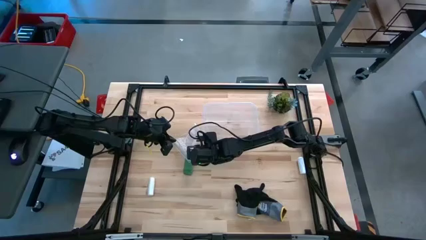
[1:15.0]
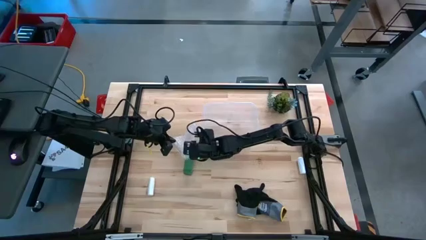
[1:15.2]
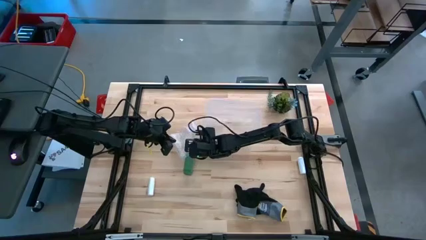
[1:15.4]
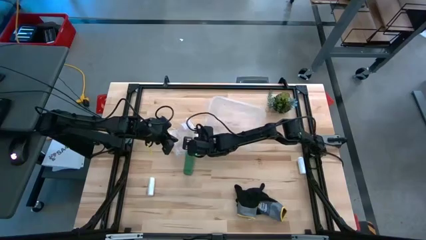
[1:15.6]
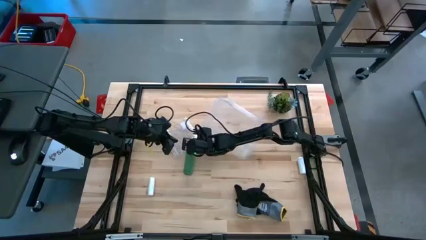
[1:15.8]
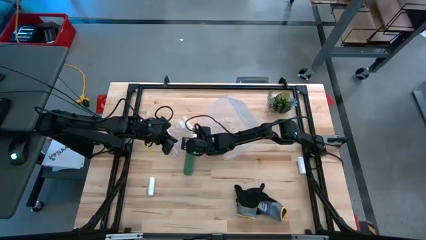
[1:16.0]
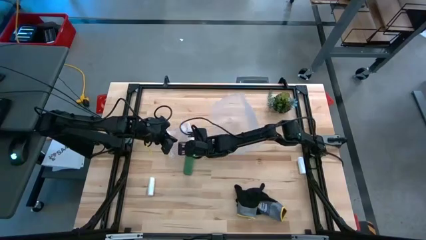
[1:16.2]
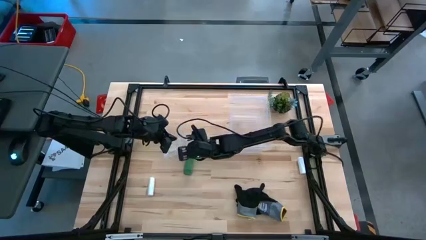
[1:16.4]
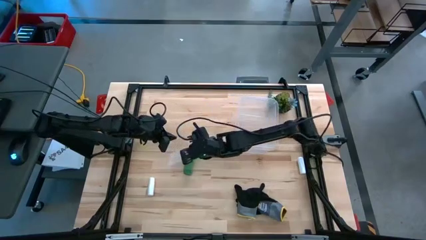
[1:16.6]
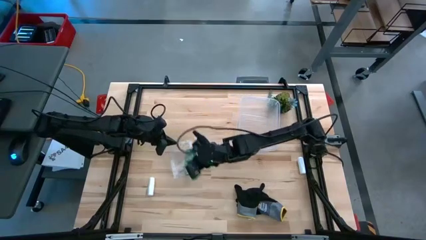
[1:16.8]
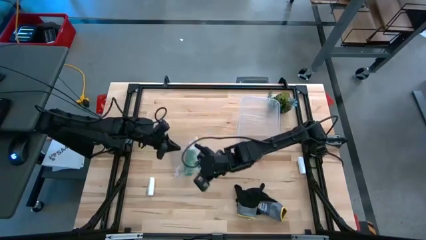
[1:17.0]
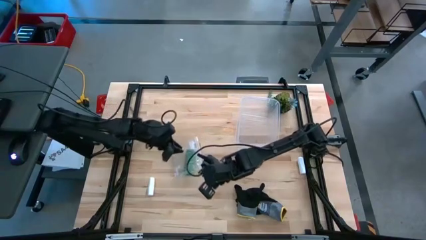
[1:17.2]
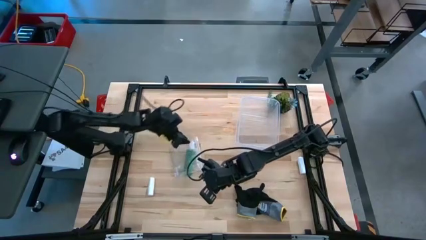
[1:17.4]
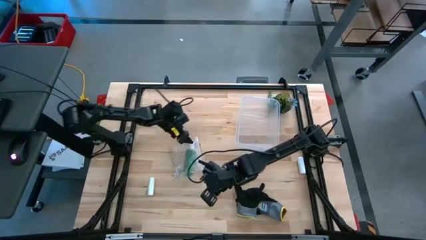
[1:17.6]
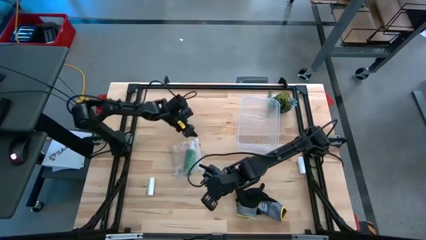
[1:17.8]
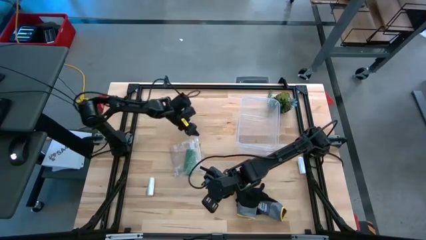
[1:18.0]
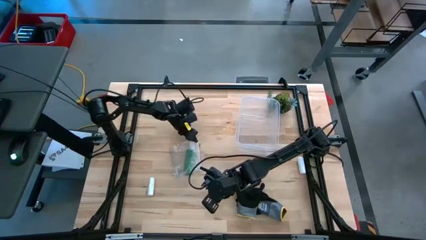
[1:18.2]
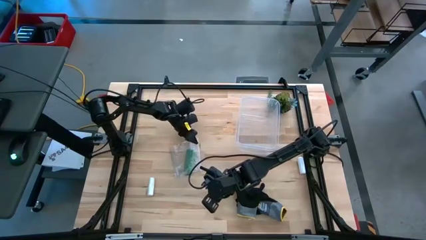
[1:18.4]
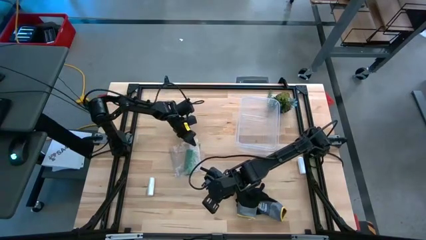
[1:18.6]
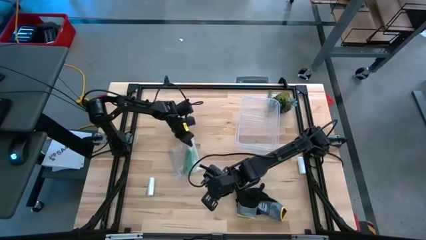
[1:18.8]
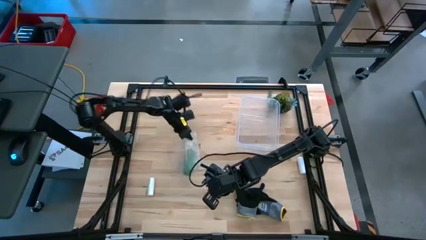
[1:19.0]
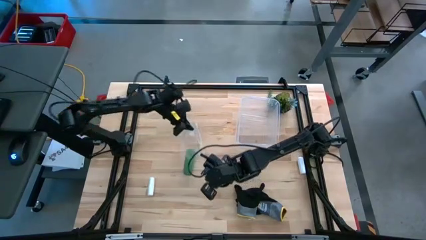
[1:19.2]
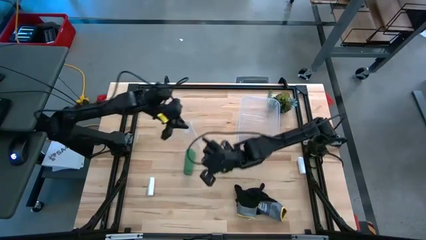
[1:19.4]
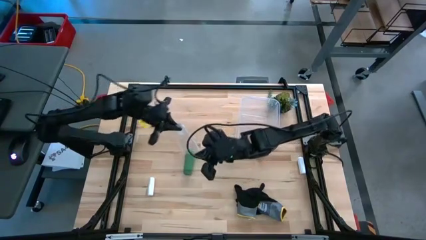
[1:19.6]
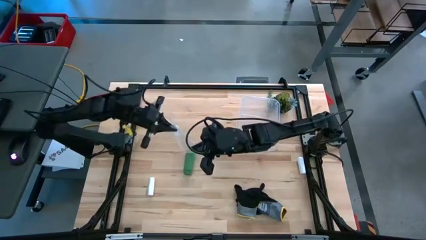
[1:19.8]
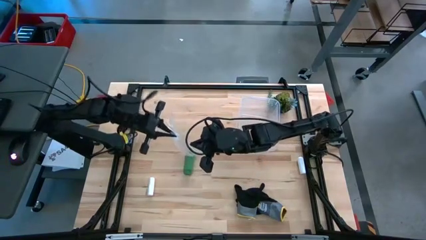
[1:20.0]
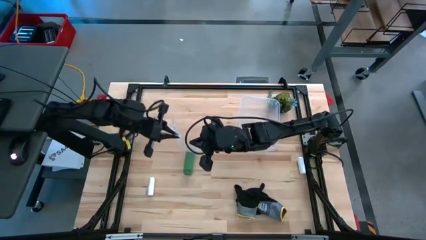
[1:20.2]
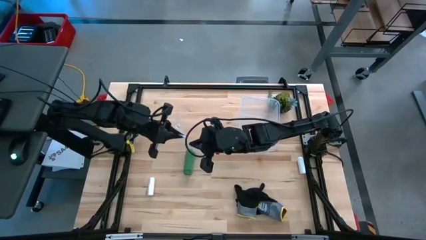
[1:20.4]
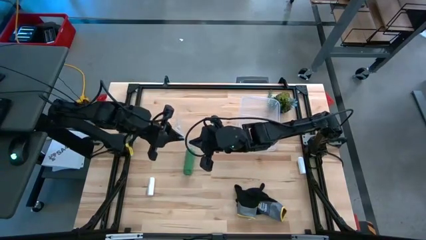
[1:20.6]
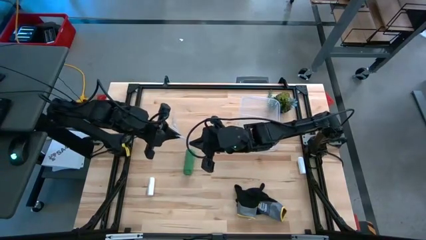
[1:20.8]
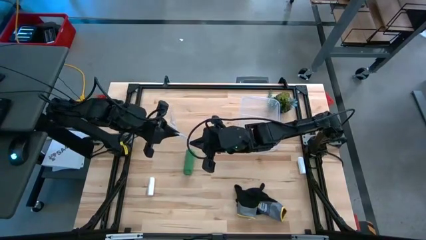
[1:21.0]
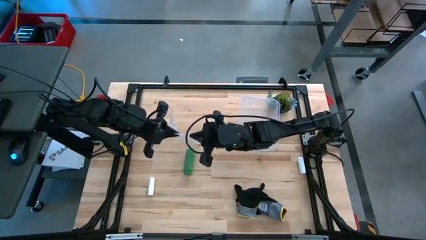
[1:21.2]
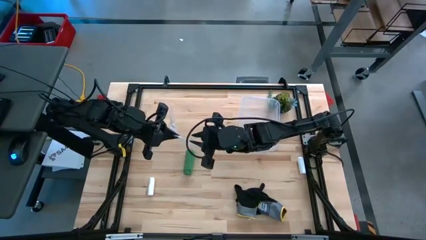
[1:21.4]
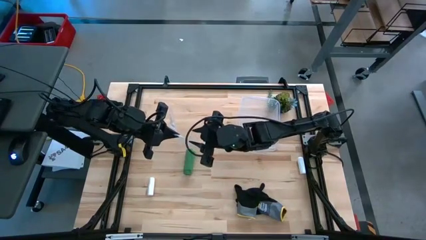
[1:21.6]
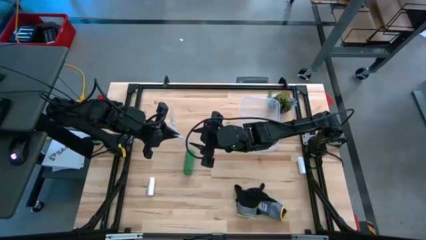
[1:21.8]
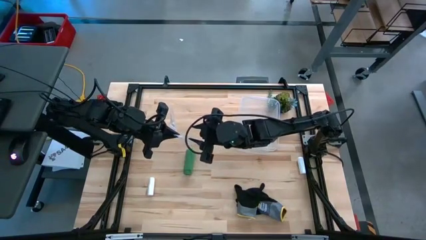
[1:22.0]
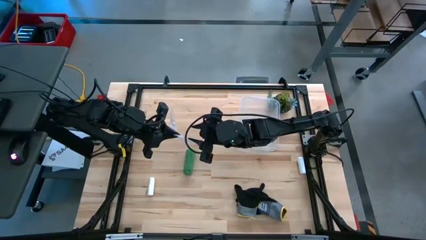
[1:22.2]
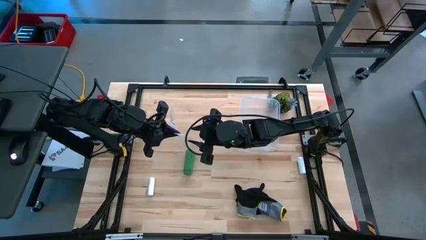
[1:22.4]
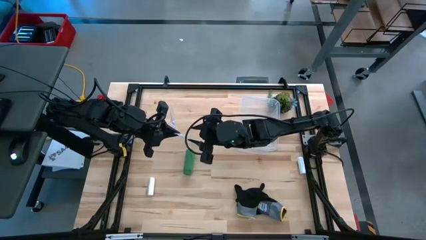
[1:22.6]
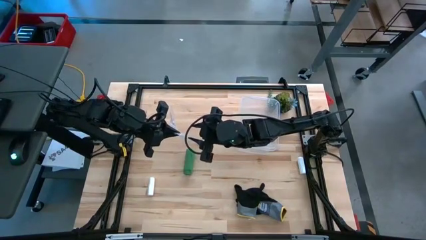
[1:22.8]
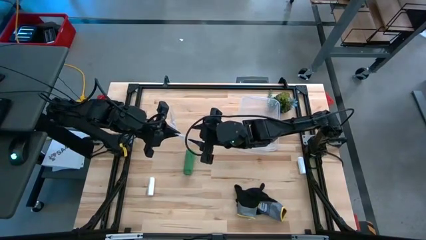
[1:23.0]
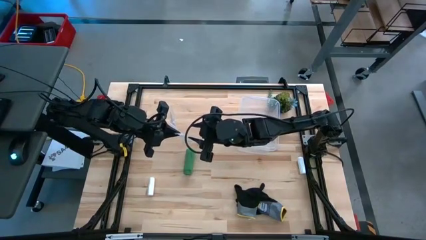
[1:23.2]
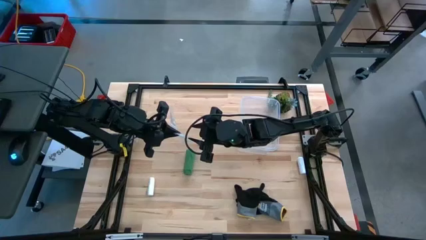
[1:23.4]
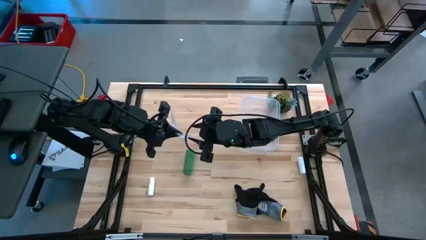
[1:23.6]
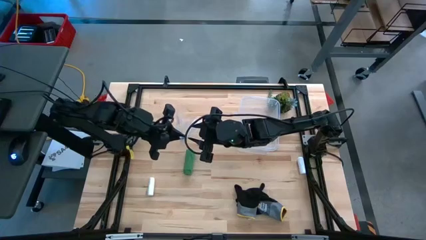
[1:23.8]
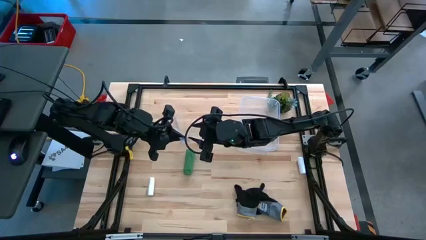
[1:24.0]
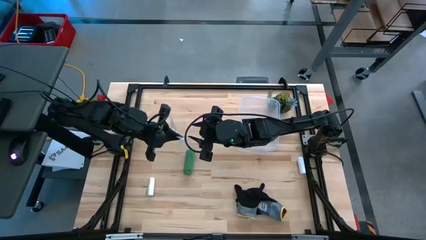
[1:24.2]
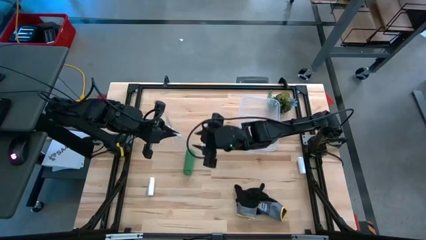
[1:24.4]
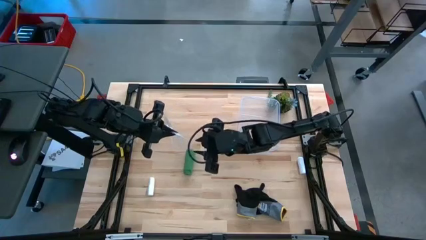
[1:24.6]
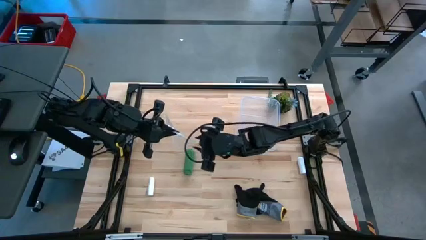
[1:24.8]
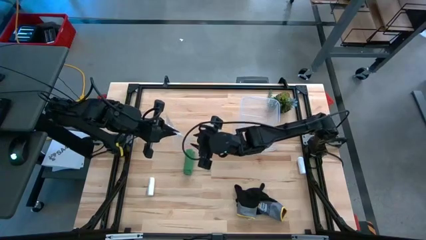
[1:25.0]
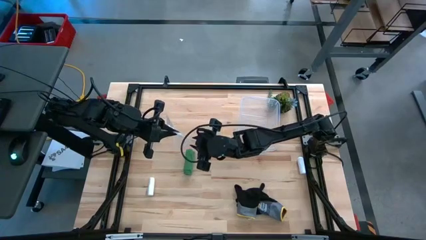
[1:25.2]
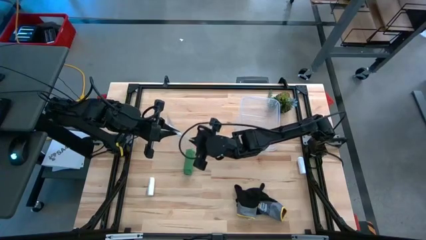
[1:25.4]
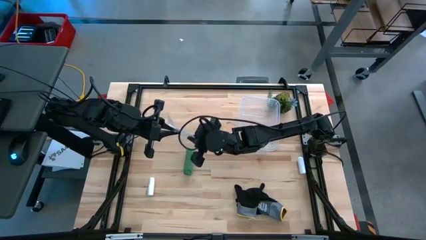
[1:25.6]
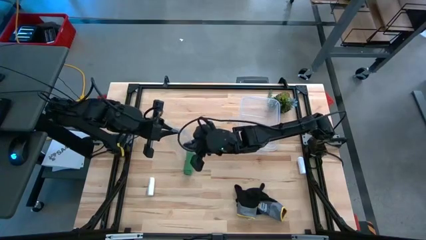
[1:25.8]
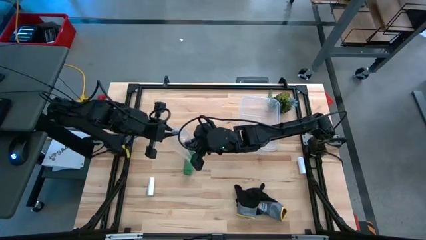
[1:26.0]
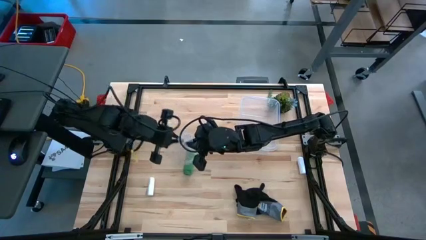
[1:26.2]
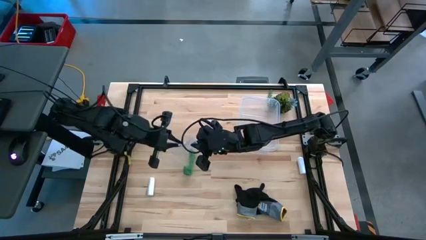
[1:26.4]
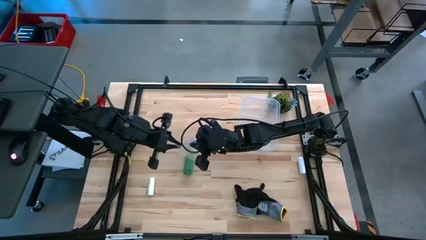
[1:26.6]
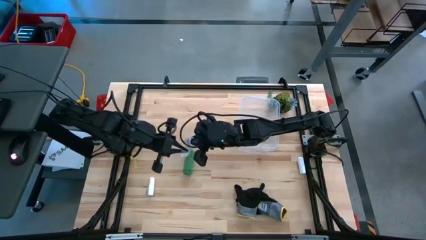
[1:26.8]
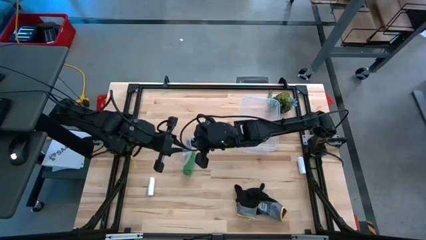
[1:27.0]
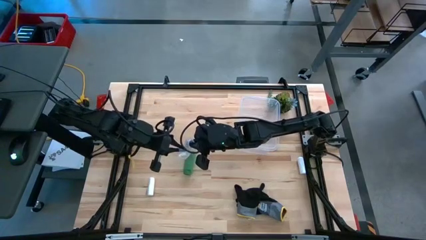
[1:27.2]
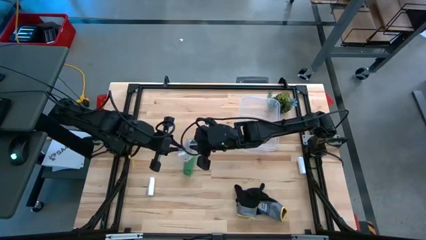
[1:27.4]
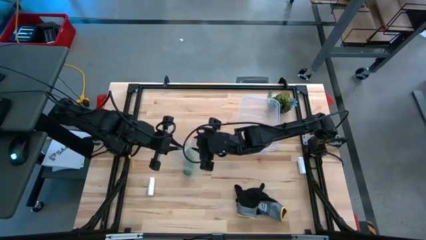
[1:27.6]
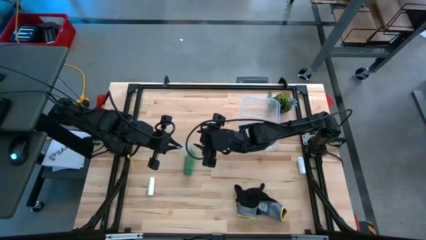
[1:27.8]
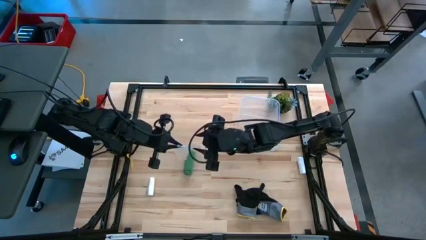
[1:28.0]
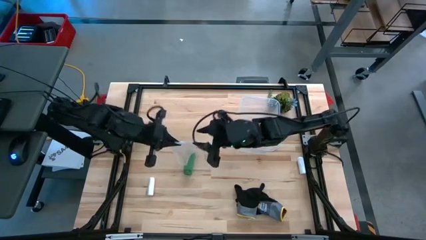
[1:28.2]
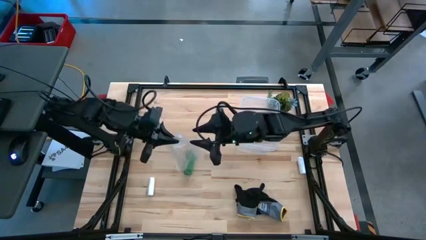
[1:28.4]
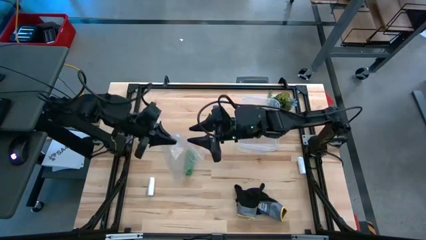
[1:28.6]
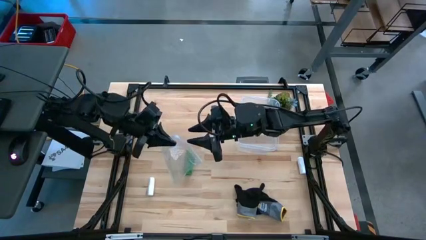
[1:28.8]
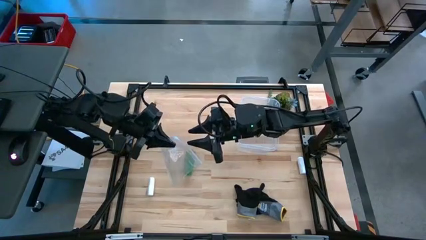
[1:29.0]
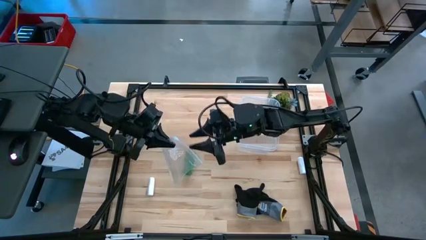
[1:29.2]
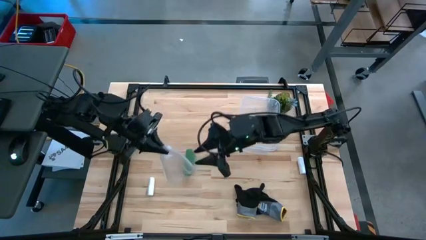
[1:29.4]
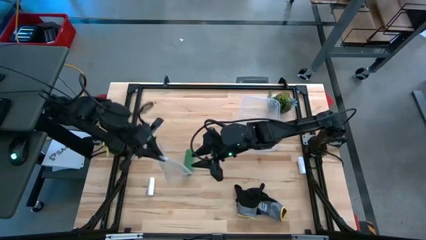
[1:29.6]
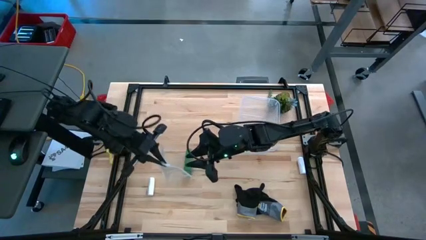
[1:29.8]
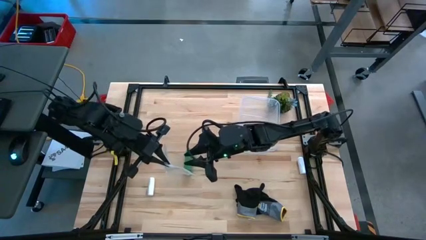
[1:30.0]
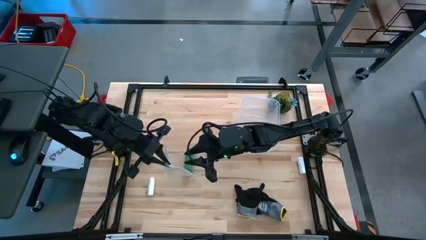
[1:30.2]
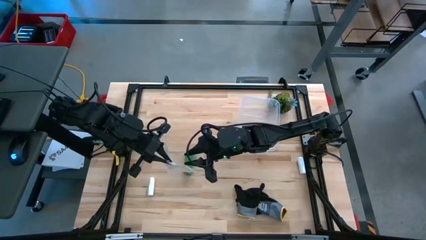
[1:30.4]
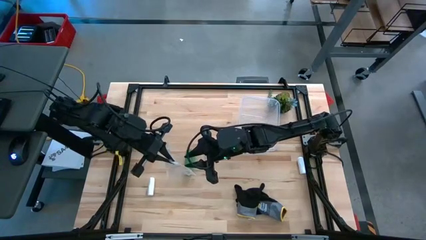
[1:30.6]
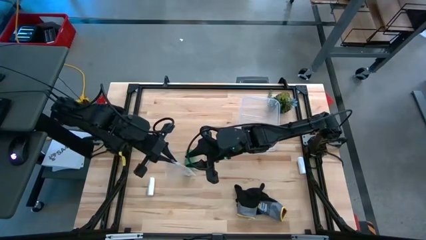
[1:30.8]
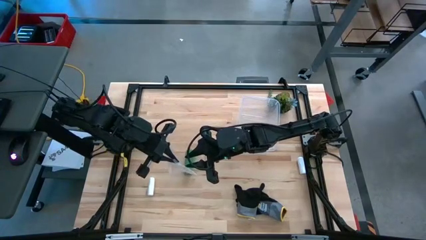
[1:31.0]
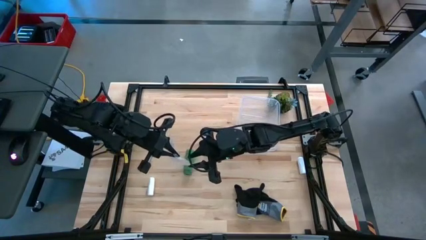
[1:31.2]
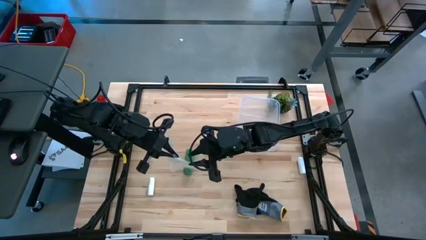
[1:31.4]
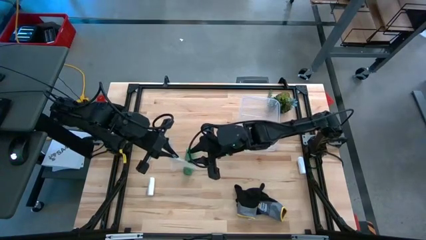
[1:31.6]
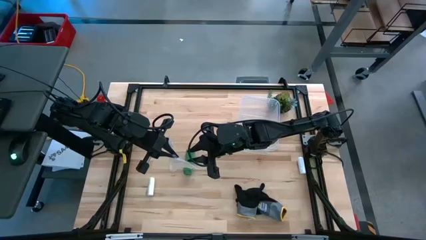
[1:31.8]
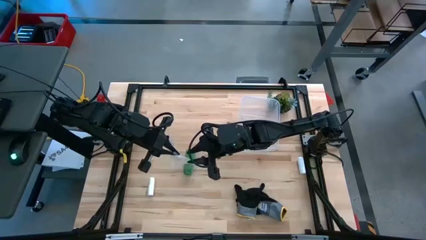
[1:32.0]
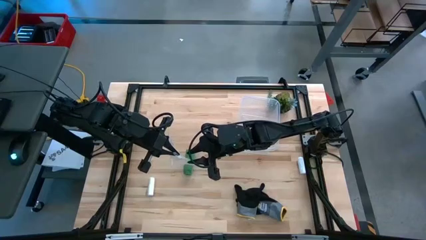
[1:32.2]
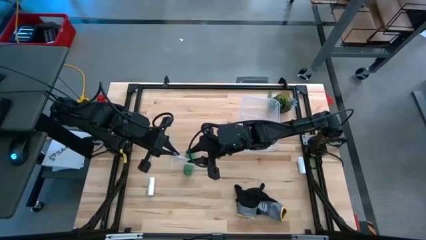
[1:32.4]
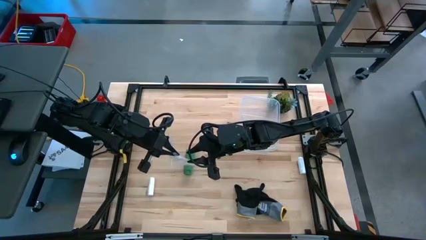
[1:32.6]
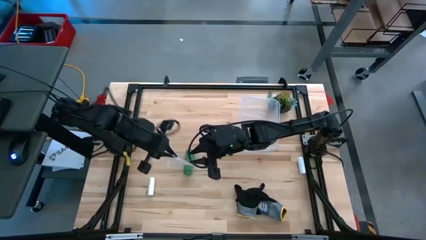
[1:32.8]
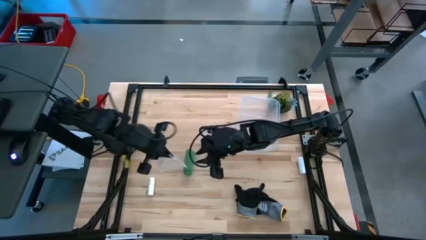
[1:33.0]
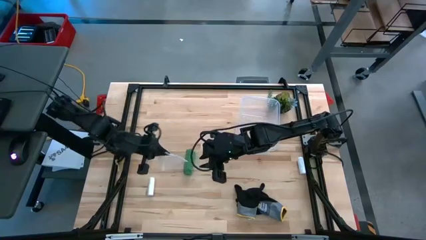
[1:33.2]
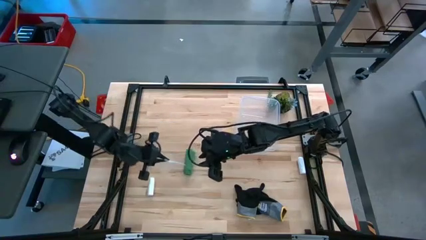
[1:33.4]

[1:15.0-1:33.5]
Task: Roll bandage
Open the transparent zip bag
